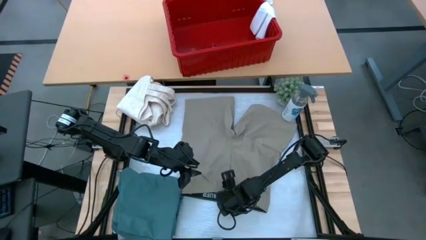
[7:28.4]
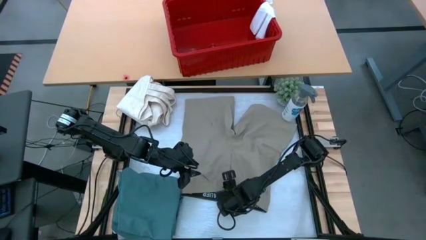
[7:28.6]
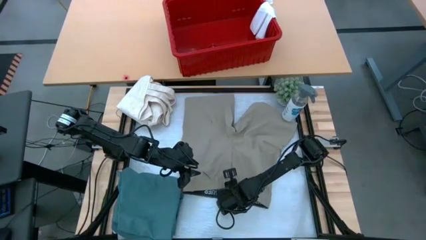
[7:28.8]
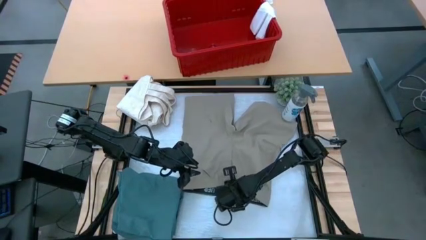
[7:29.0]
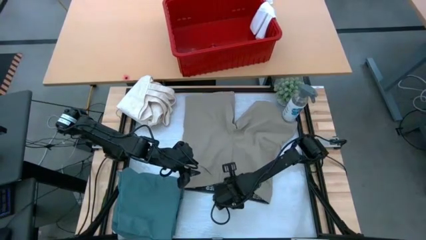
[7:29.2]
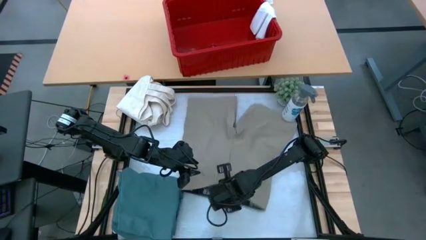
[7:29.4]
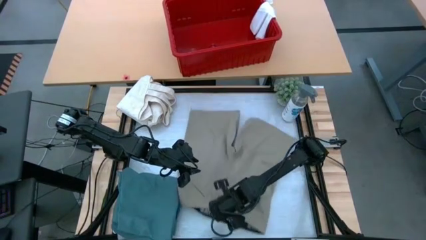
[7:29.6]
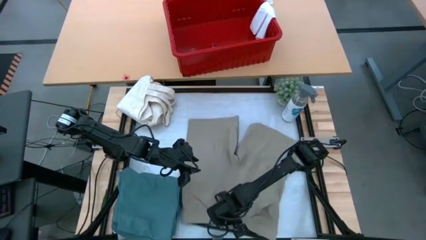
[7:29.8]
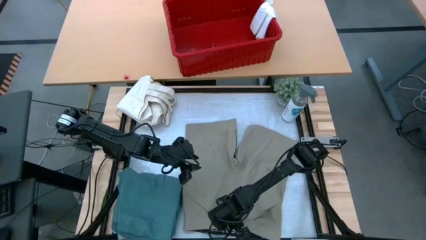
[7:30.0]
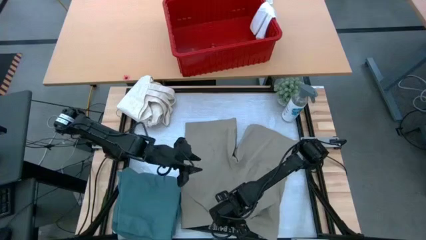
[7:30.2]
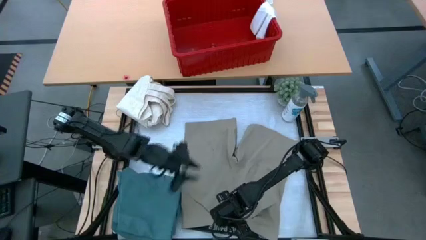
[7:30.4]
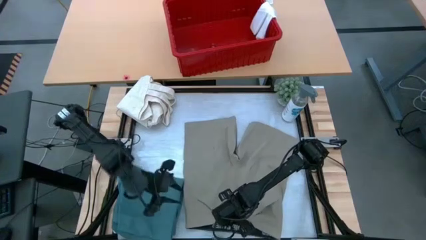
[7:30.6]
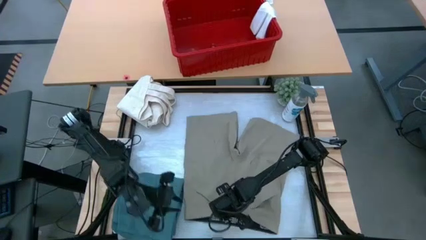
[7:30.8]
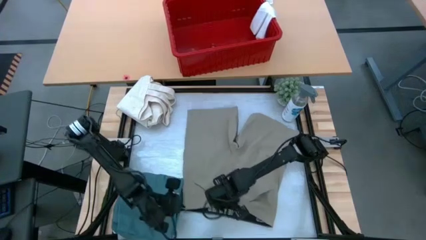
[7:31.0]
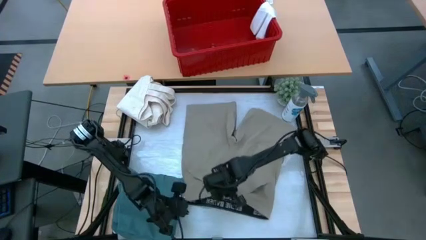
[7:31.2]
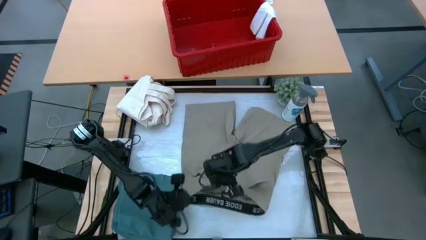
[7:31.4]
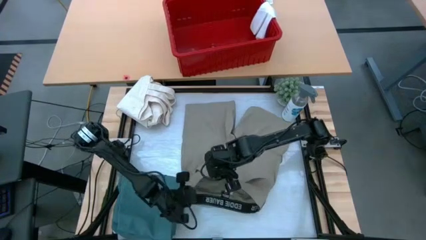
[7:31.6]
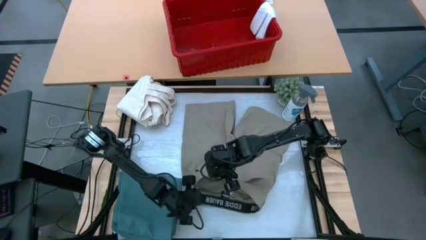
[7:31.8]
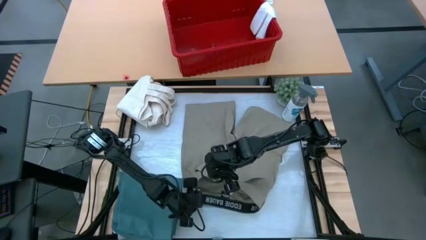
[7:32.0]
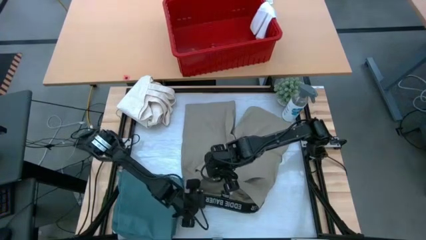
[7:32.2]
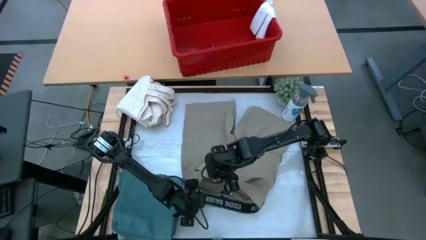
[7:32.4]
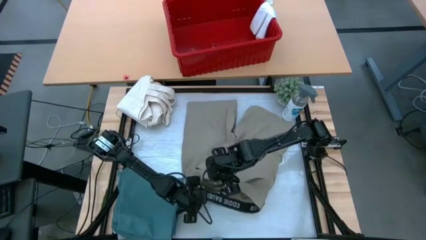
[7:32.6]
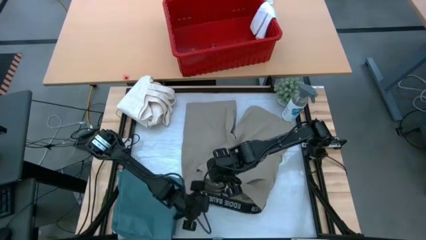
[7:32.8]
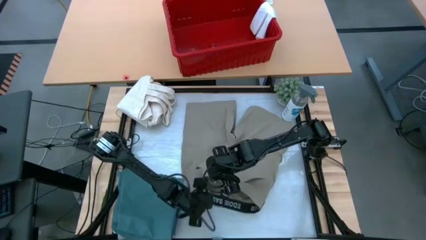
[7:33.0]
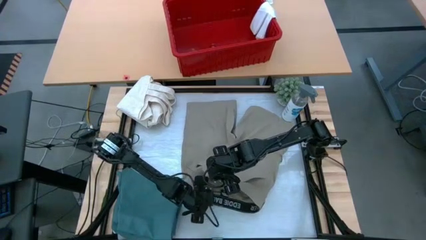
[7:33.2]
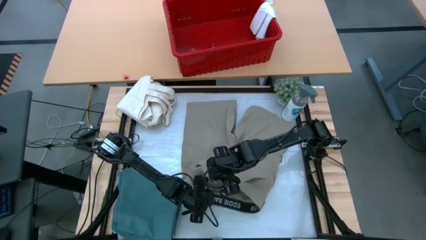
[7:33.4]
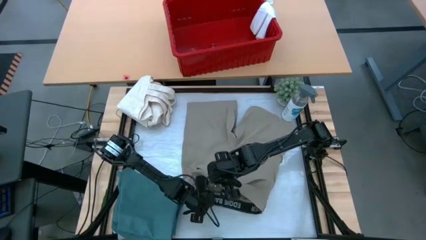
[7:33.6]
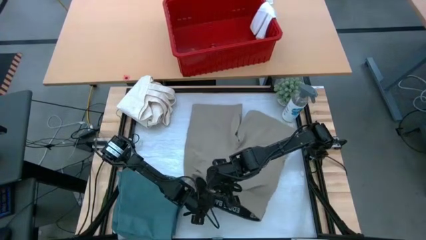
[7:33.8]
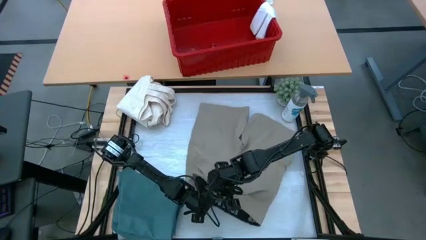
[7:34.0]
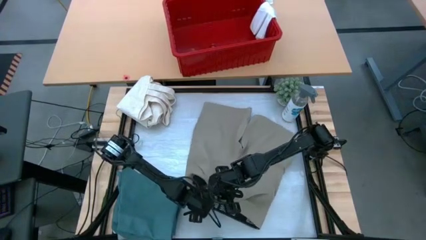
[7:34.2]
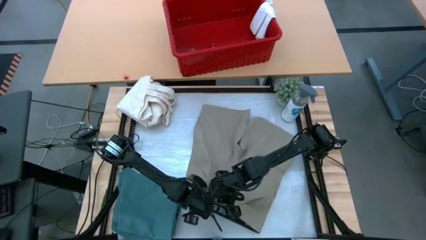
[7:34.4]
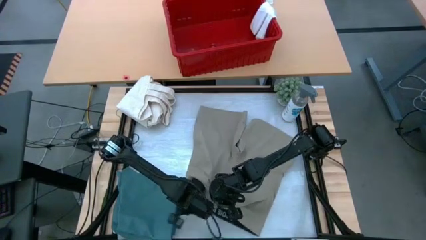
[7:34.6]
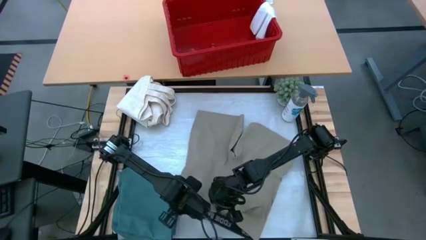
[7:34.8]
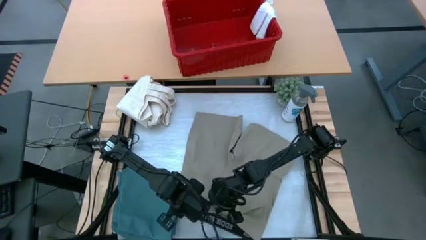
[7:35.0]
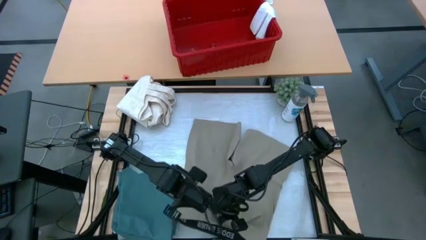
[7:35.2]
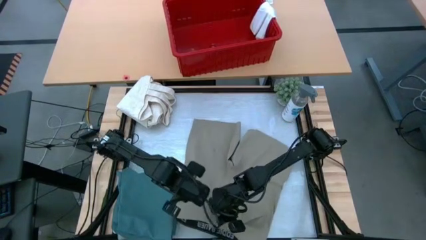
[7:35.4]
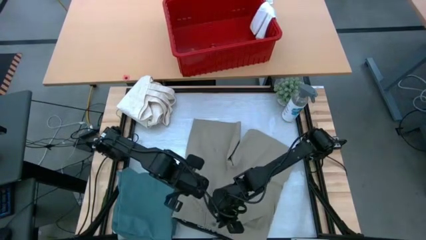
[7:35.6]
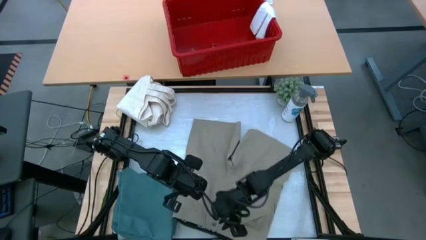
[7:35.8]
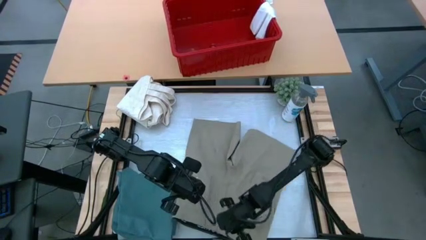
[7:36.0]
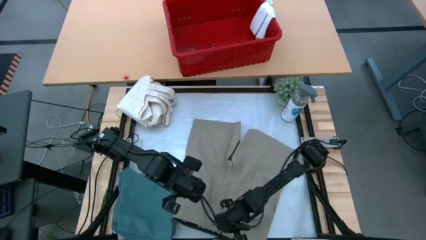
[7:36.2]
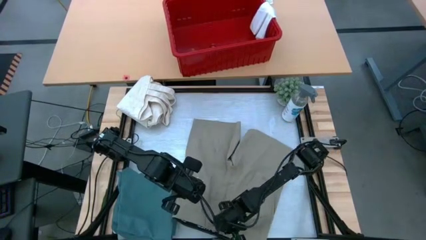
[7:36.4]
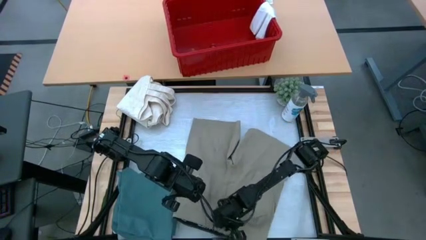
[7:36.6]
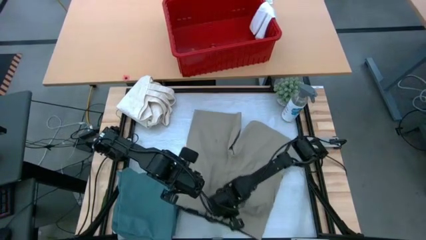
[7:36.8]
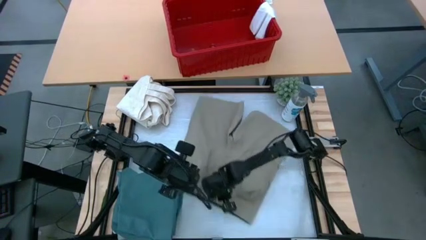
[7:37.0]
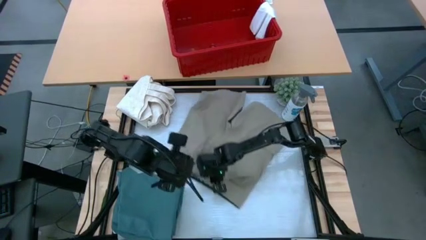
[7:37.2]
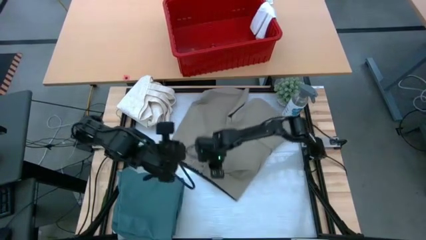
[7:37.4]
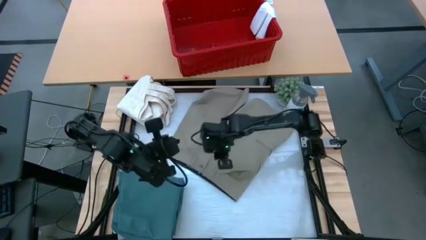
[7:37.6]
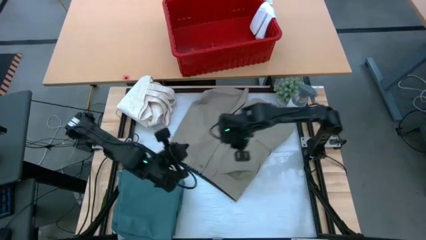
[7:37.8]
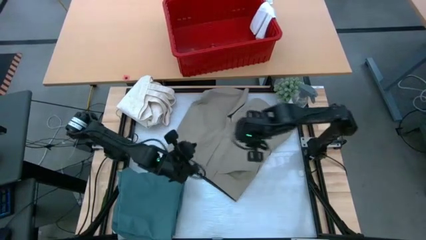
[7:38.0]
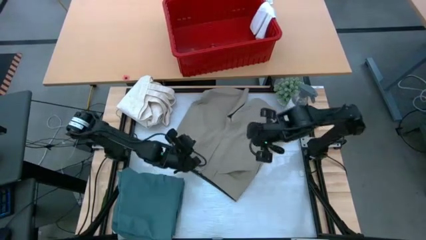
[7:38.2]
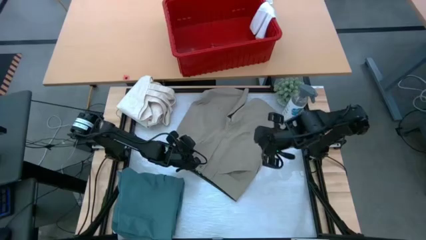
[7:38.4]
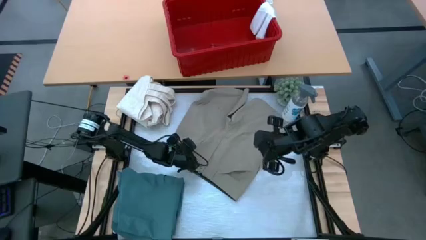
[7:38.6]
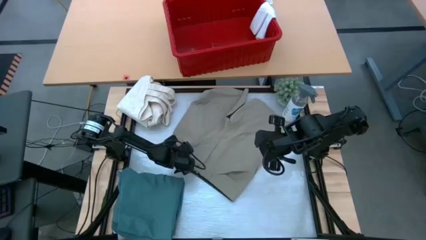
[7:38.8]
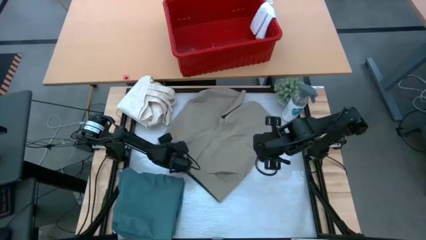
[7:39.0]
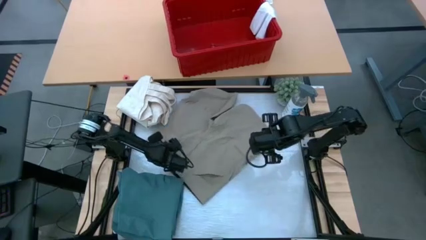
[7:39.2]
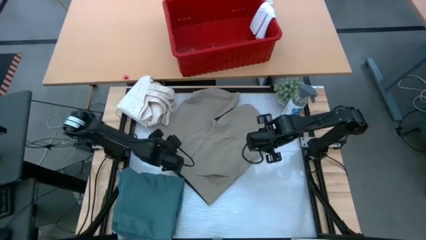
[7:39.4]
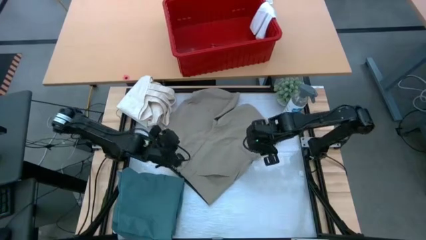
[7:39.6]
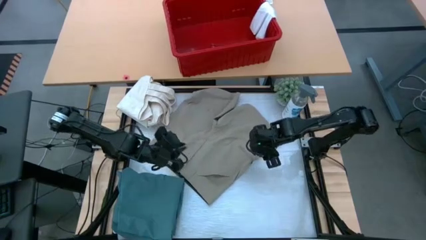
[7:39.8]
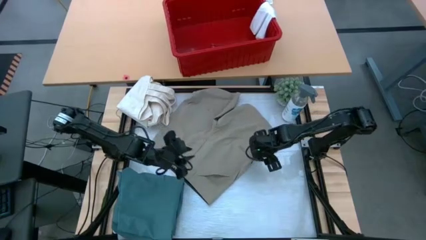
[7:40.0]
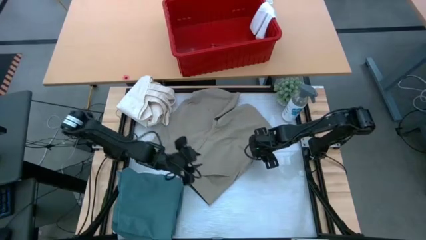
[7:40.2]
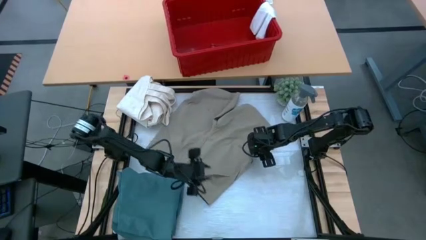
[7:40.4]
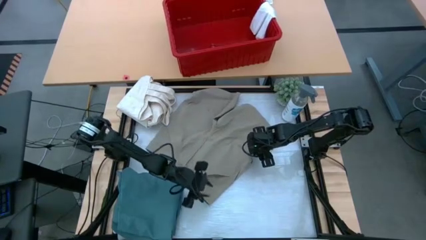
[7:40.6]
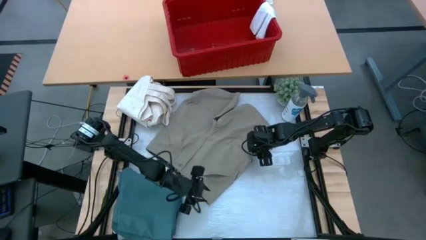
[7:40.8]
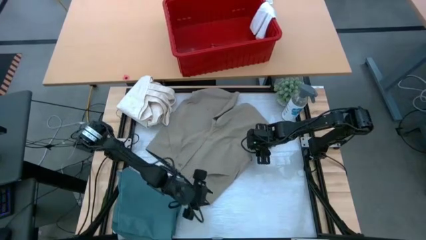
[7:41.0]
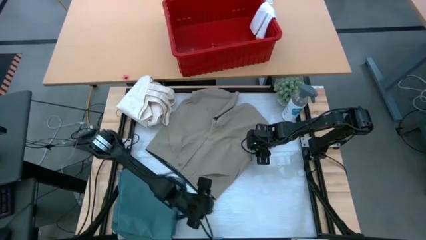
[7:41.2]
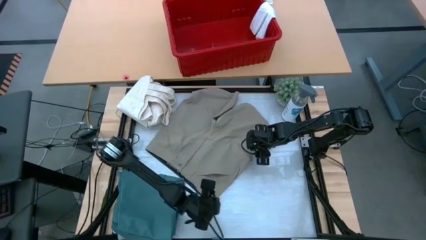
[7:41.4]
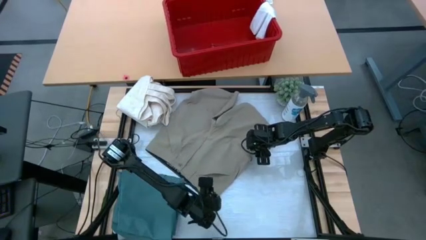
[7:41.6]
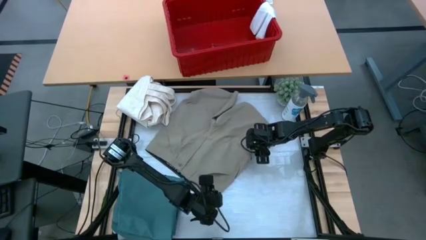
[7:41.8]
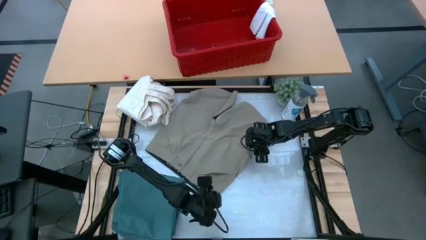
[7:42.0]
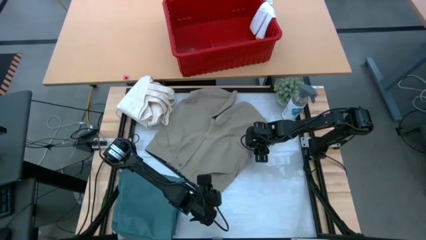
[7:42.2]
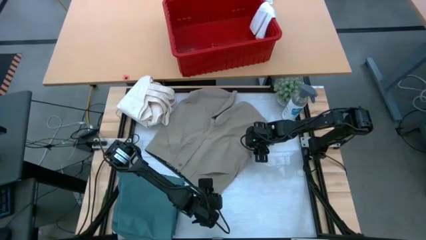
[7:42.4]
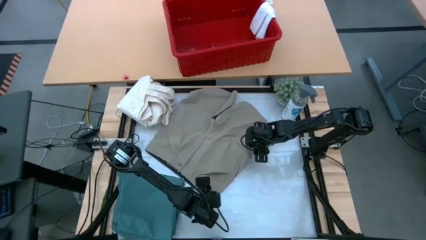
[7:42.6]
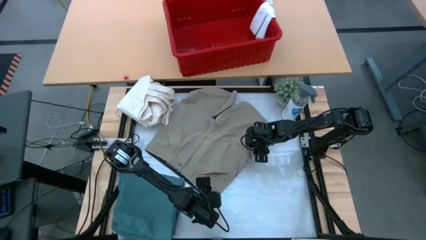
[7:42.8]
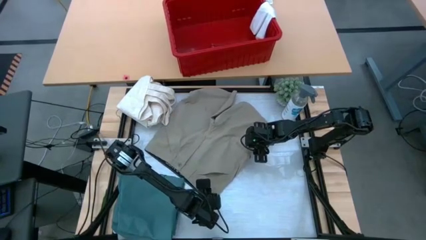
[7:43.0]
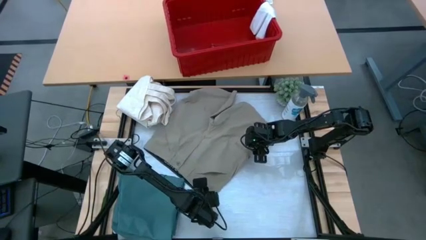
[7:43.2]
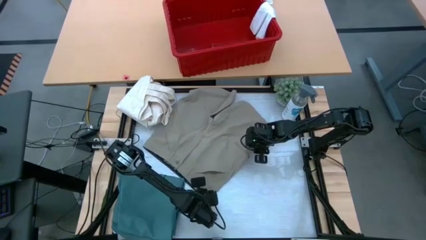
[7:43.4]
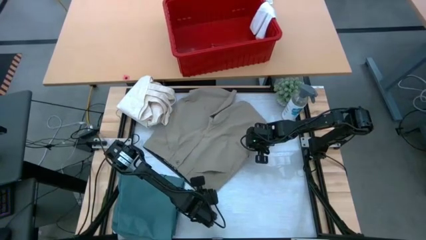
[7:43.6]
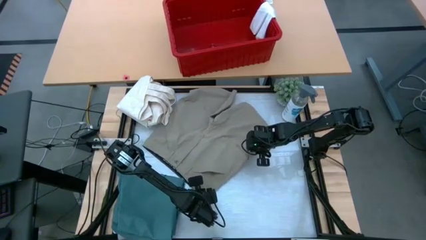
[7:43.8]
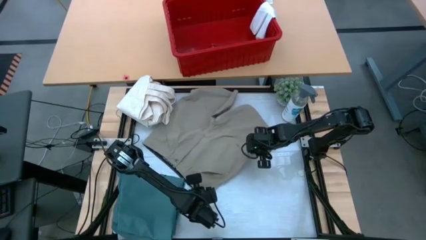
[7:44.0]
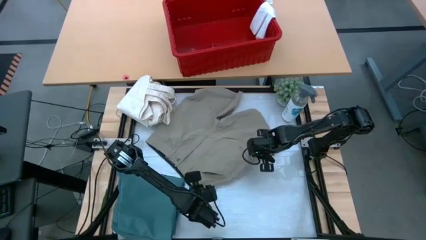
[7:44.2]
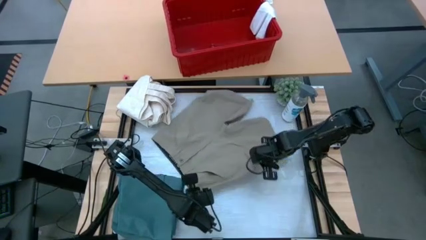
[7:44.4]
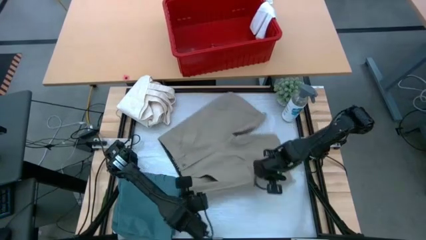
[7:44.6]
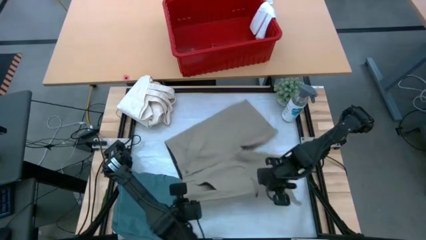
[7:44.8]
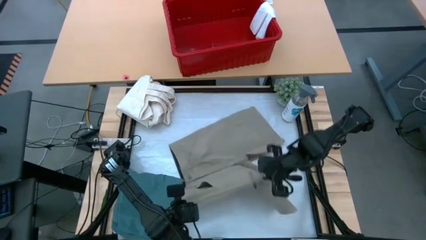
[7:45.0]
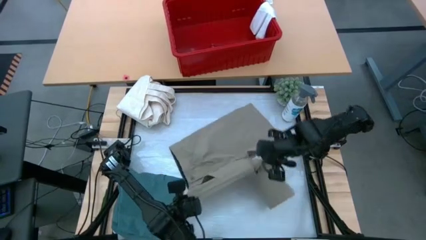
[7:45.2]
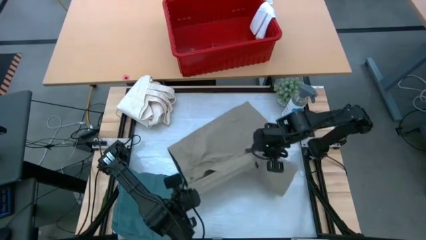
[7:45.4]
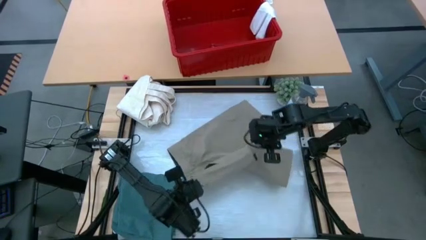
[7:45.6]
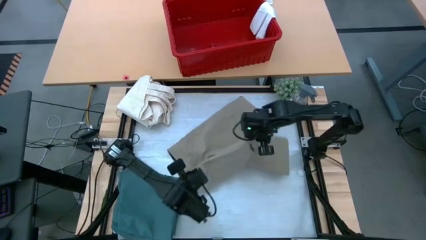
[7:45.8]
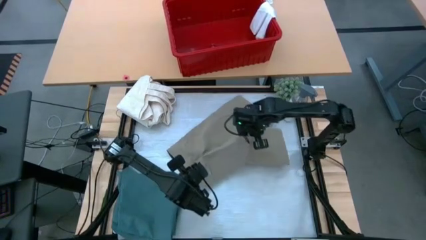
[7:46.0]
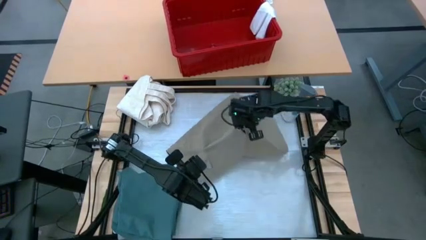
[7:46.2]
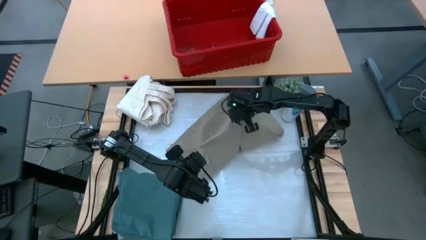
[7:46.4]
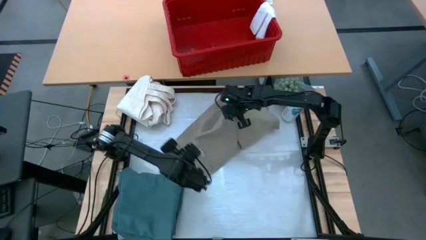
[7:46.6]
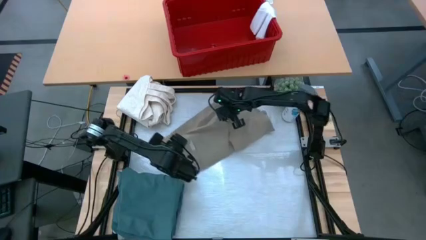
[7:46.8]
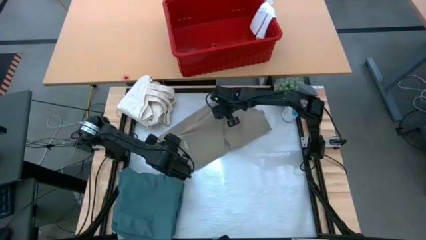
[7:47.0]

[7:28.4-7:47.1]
Task: Fold Laundry from Bin
Fold the brown shorts
